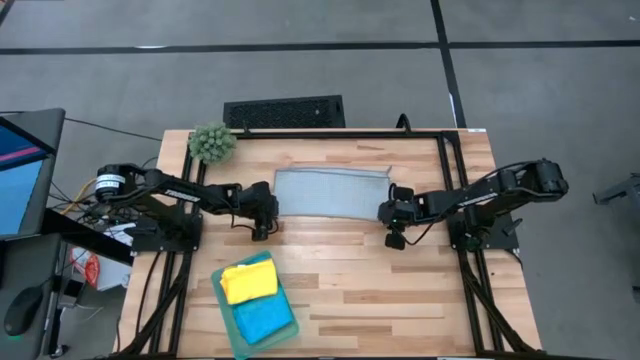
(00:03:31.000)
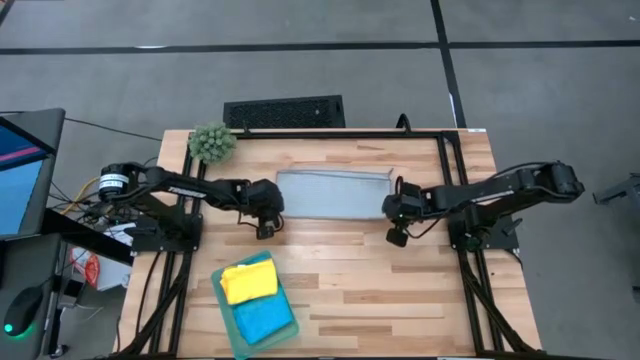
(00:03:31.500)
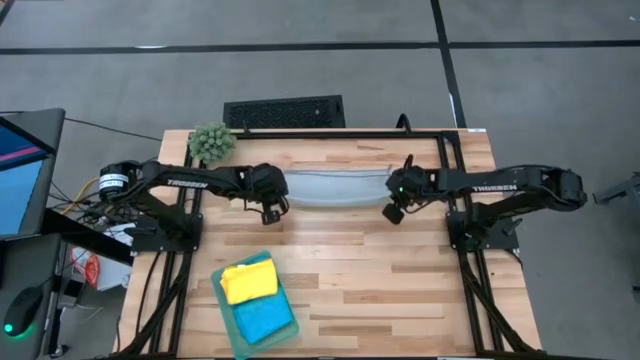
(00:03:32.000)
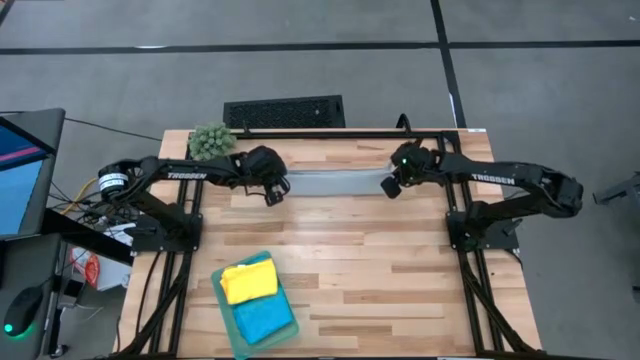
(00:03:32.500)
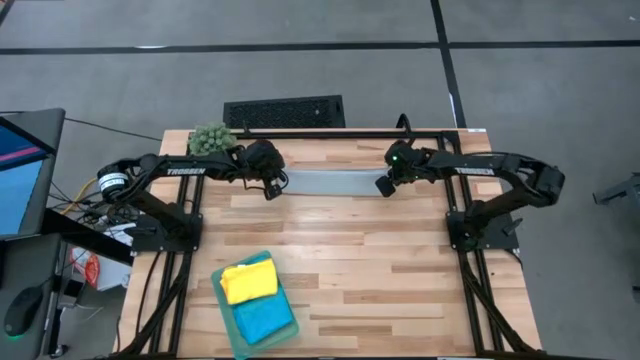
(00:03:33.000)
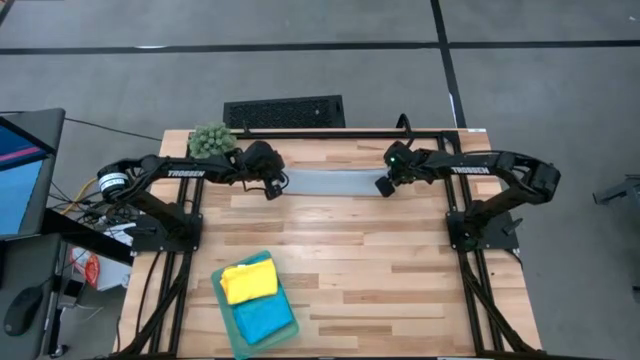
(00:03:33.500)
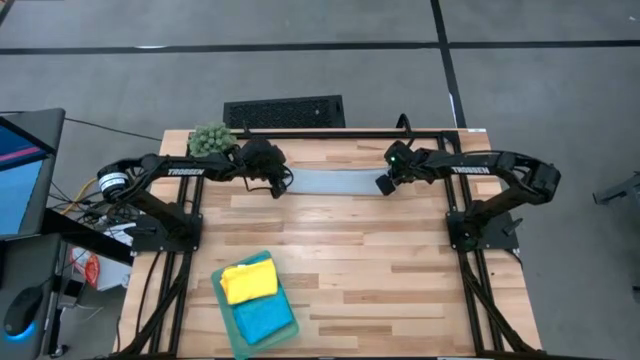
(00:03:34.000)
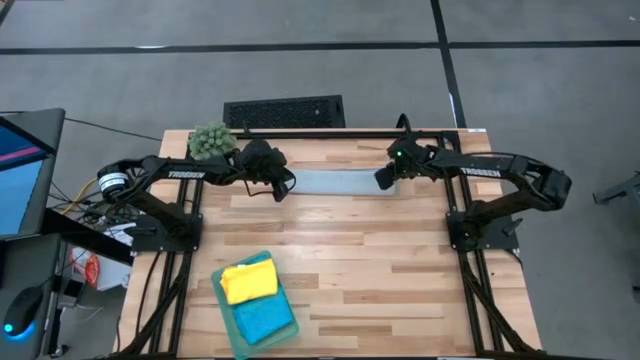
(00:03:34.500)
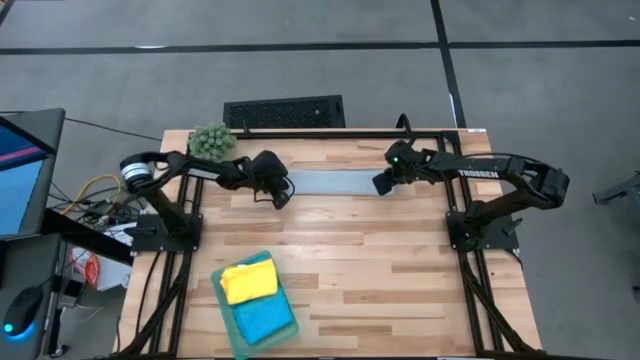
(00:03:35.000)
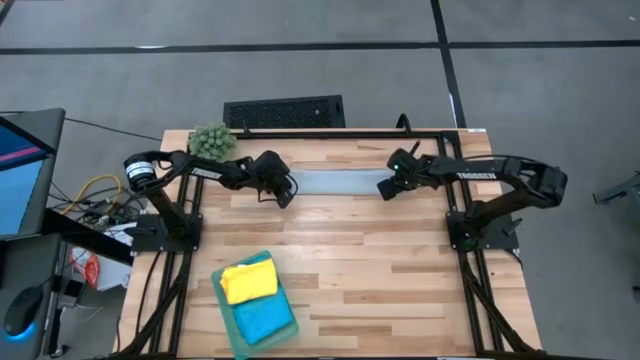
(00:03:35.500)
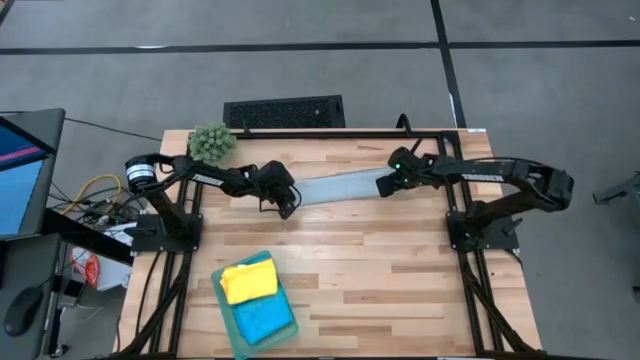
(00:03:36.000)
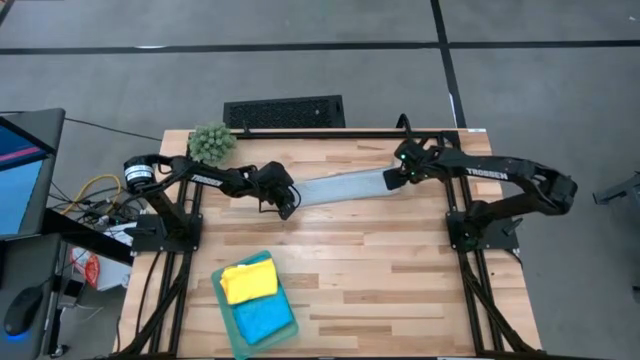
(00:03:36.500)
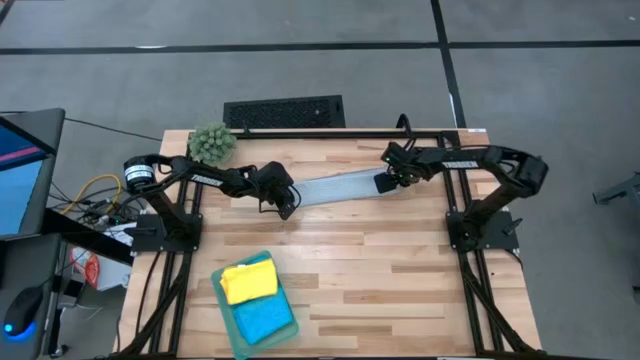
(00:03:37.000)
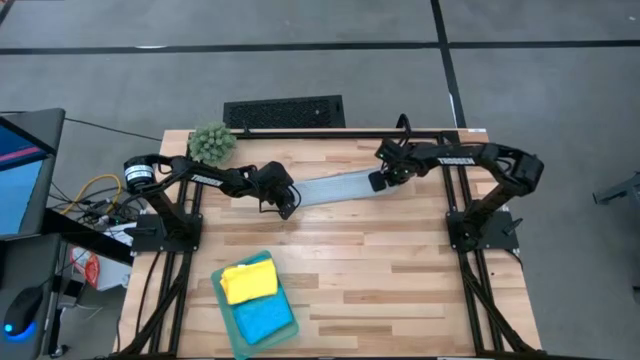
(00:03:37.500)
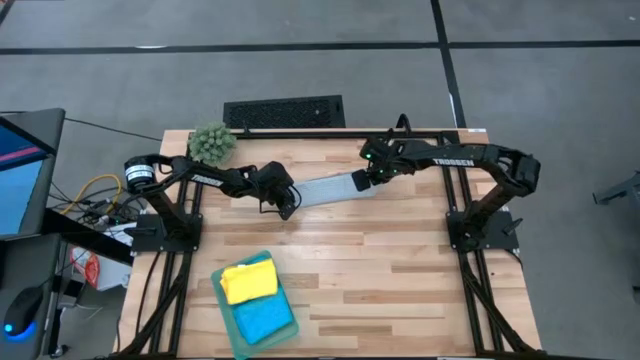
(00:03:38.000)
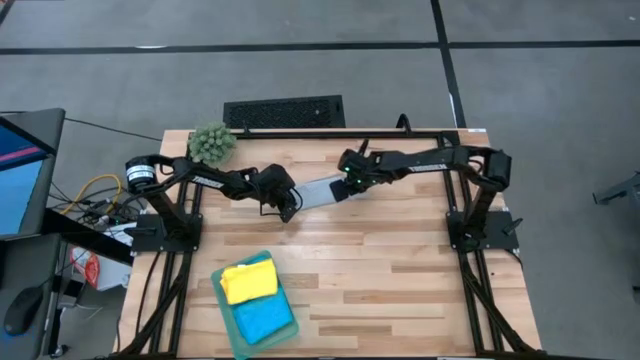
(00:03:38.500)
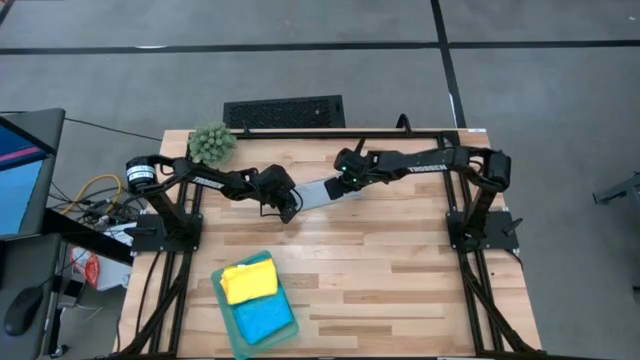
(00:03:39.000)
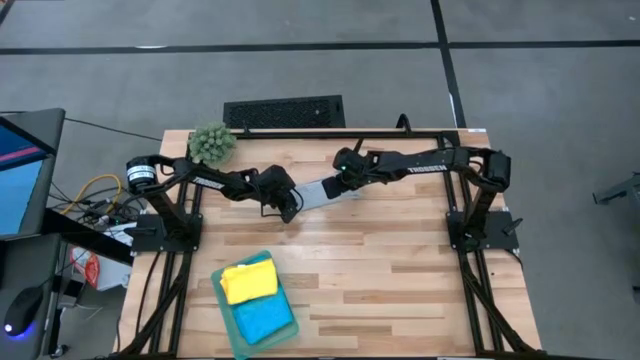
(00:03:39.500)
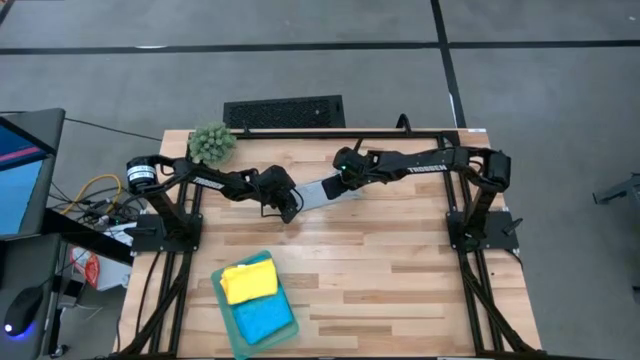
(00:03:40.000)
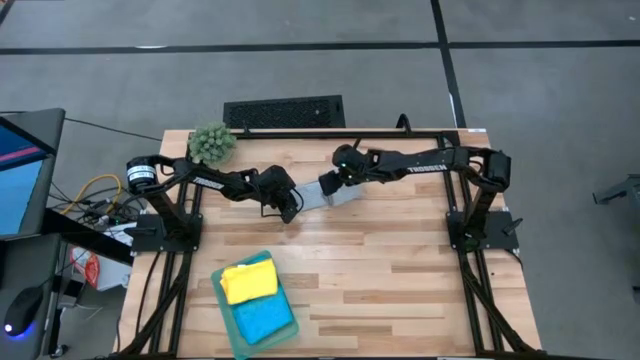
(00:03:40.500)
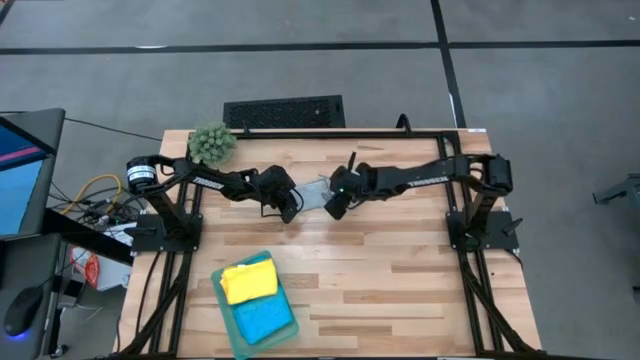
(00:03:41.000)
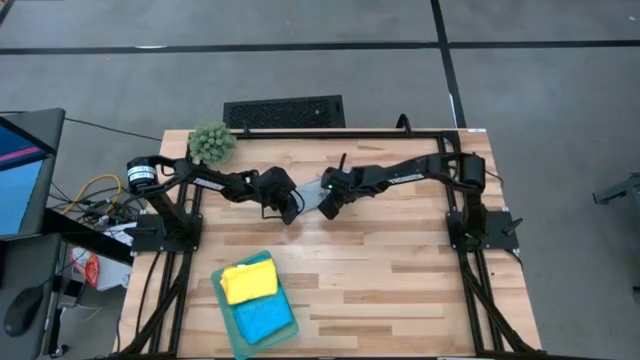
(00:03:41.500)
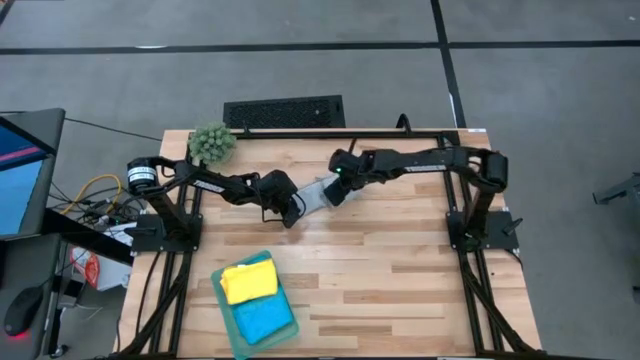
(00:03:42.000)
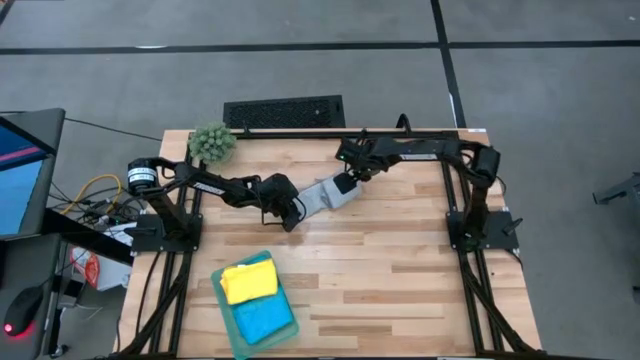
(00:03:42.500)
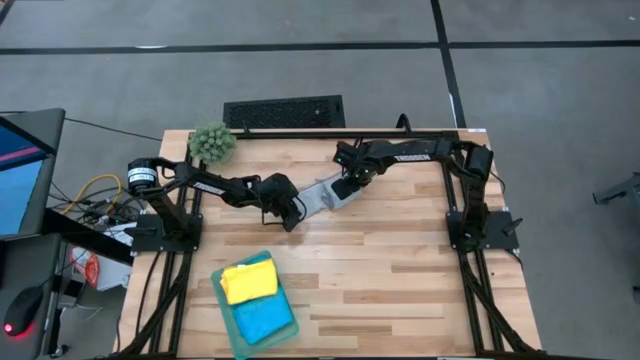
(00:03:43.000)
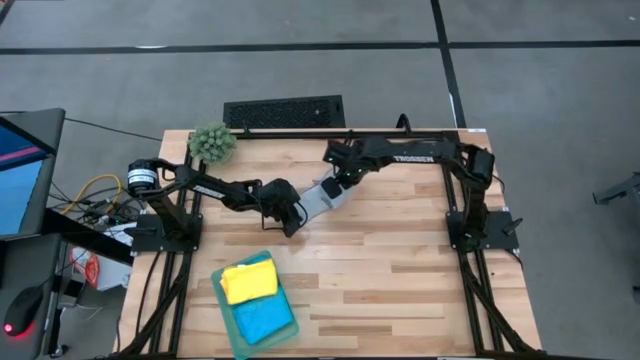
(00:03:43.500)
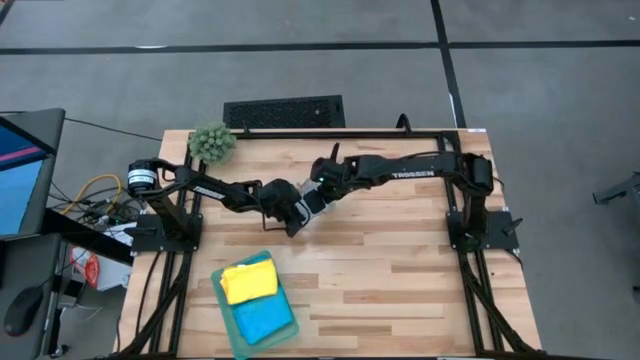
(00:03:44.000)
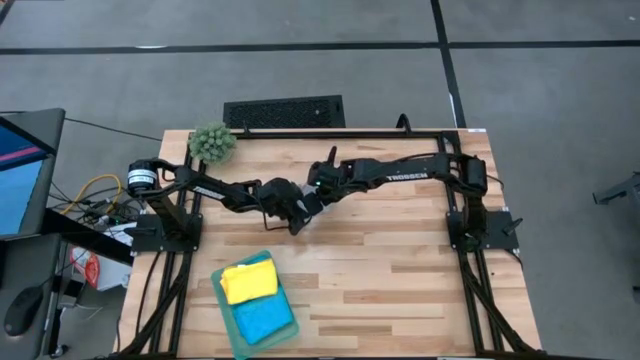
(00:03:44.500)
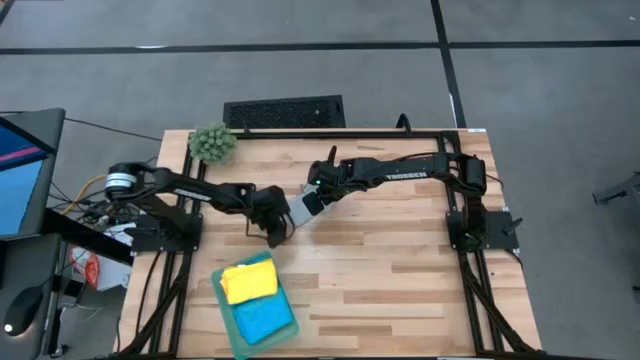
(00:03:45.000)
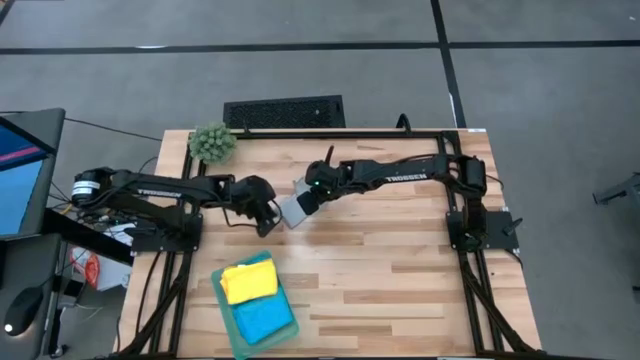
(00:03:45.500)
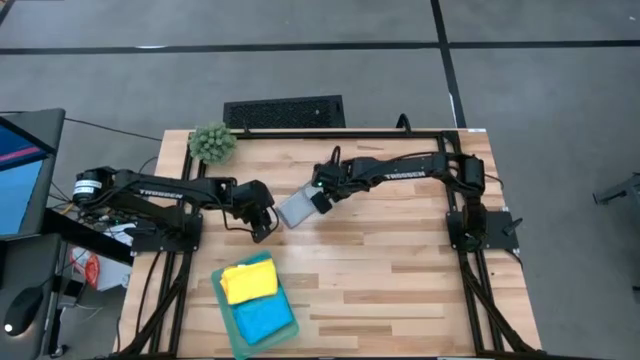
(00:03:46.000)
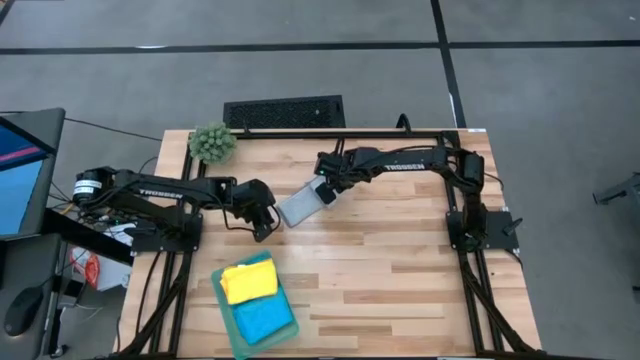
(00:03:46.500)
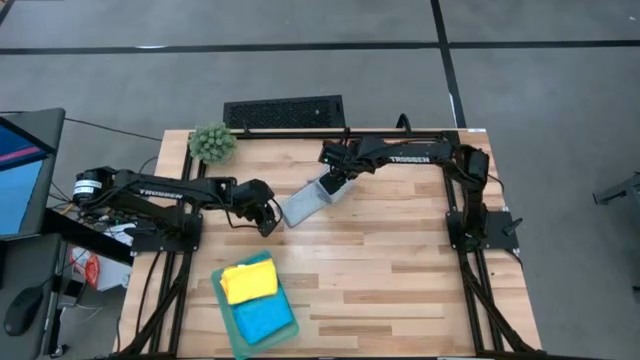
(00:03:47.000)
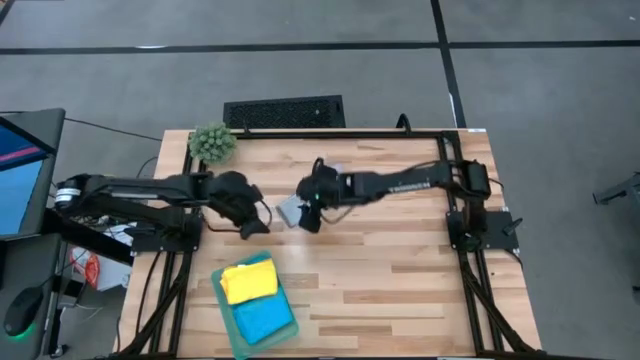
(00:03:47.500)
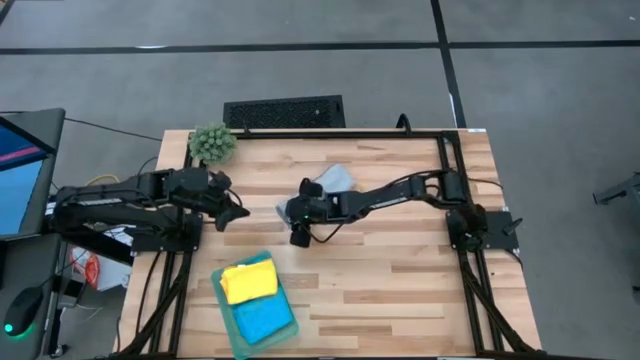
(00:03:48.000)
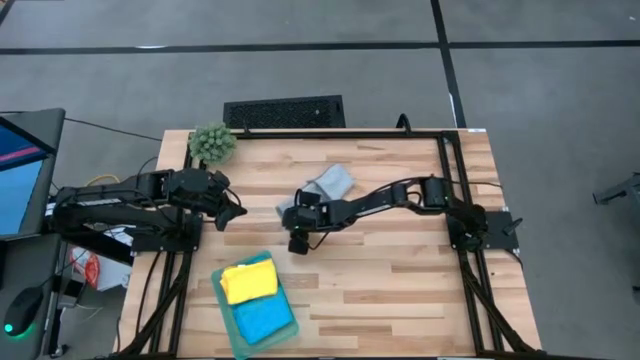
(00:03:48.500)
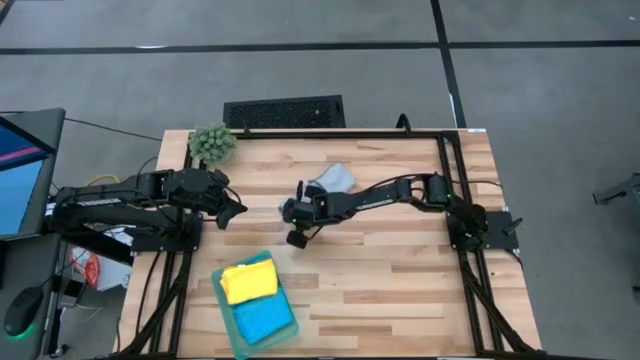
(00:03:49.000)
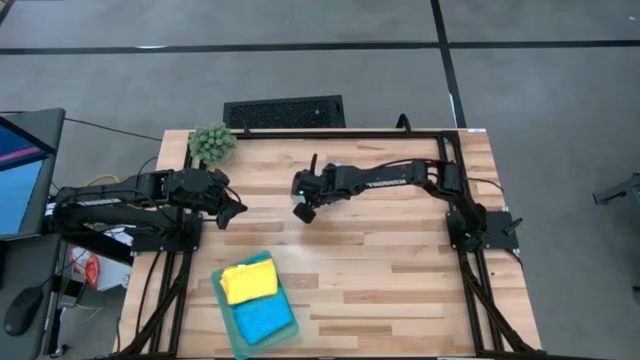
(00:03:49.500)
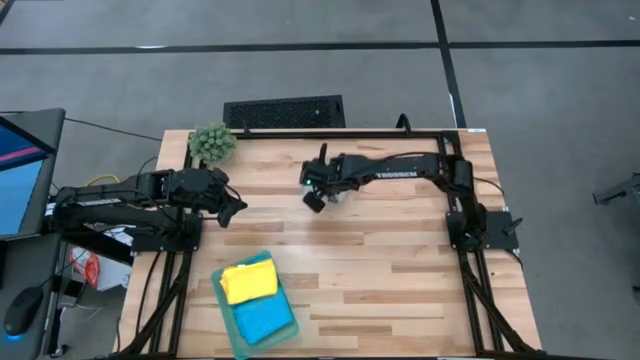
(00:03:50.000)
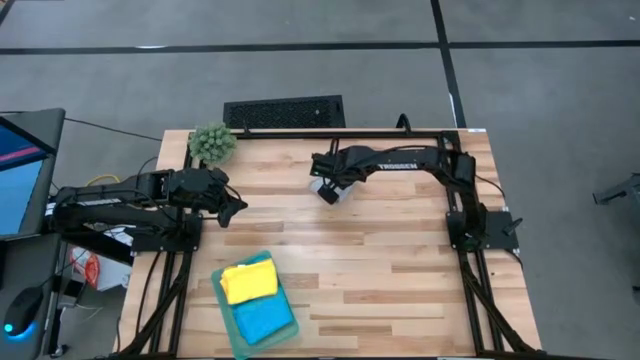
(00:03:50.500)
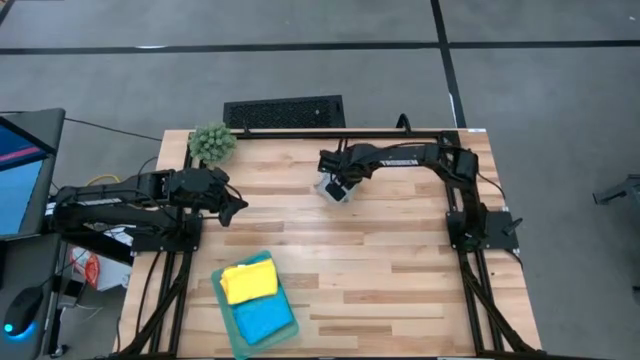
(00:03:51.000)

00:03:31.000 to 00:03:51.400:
Task: Fold microfiber towels
Fold the gray towel and put into the bin
